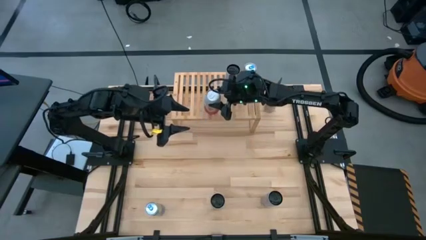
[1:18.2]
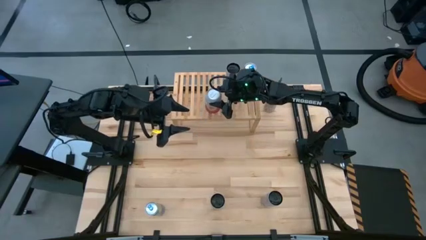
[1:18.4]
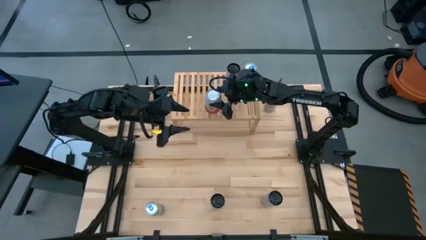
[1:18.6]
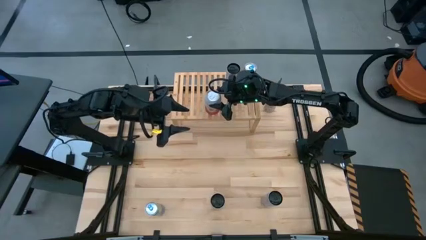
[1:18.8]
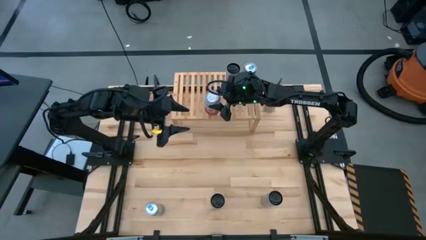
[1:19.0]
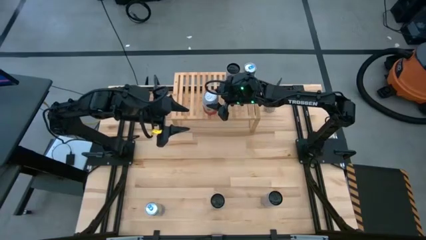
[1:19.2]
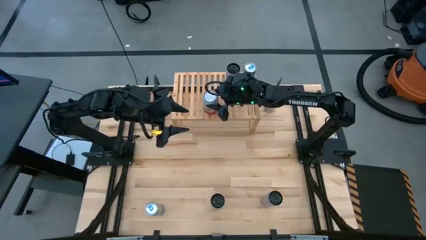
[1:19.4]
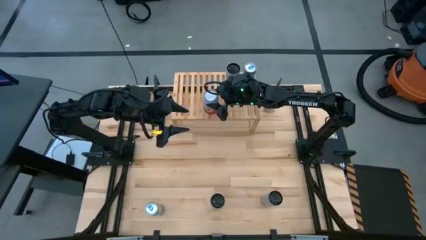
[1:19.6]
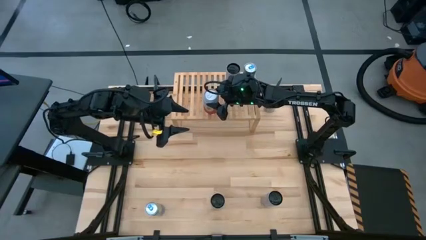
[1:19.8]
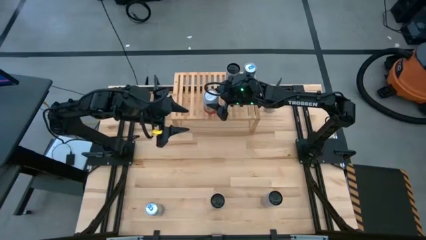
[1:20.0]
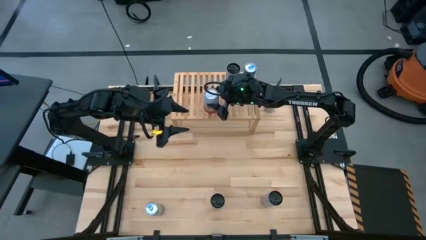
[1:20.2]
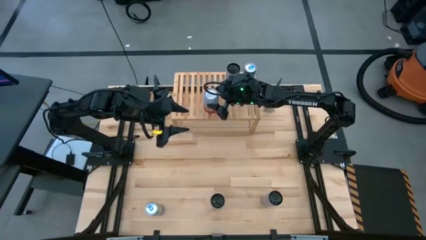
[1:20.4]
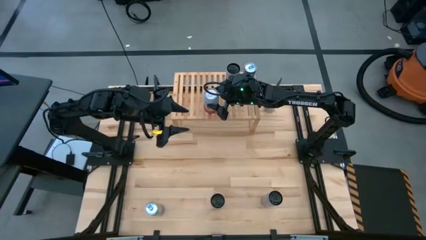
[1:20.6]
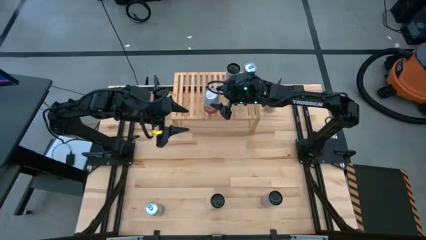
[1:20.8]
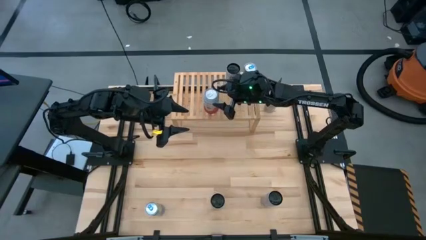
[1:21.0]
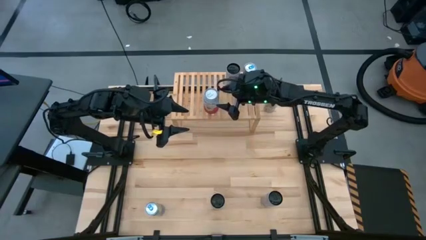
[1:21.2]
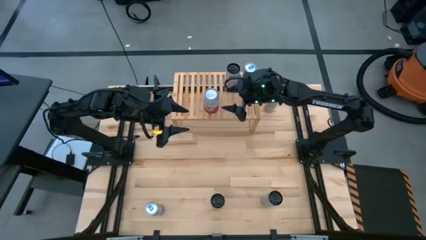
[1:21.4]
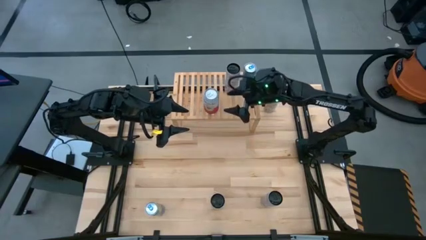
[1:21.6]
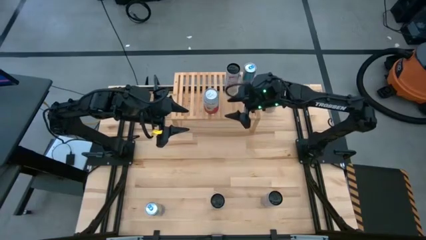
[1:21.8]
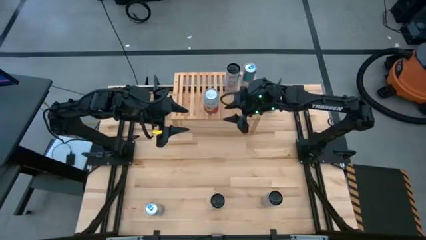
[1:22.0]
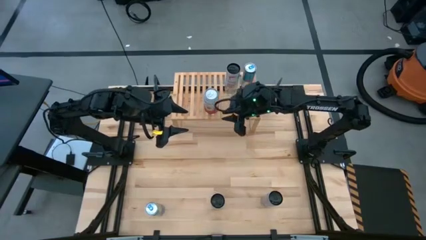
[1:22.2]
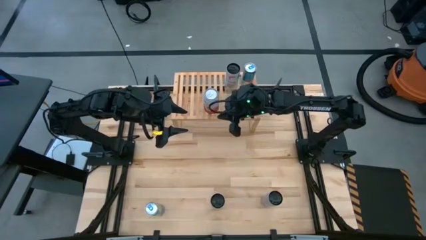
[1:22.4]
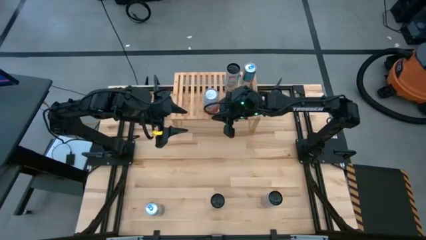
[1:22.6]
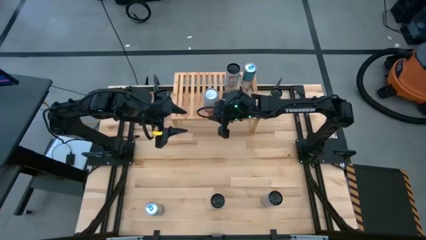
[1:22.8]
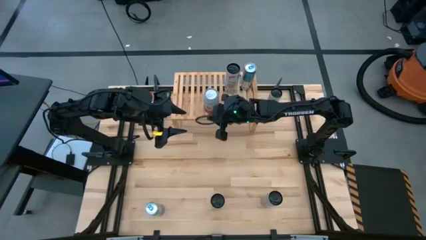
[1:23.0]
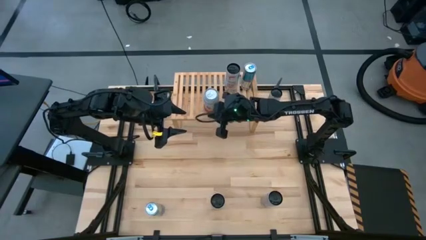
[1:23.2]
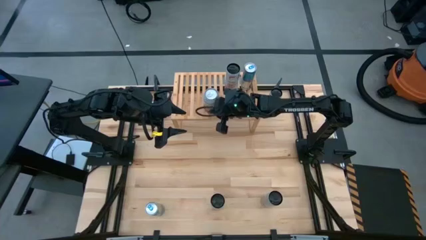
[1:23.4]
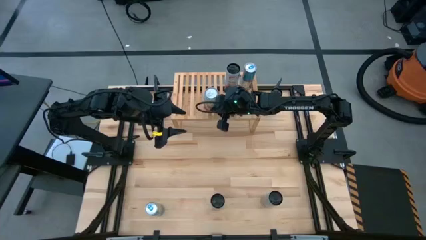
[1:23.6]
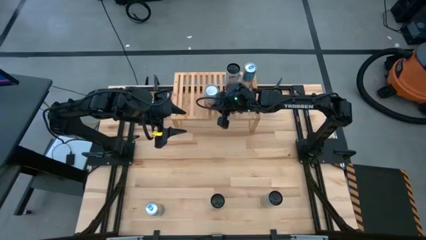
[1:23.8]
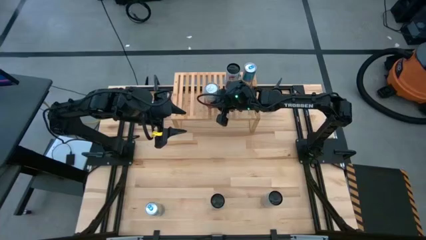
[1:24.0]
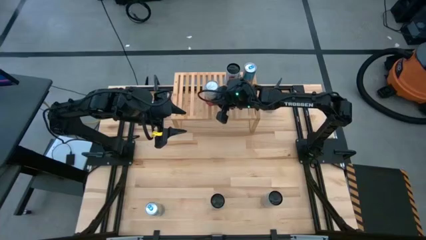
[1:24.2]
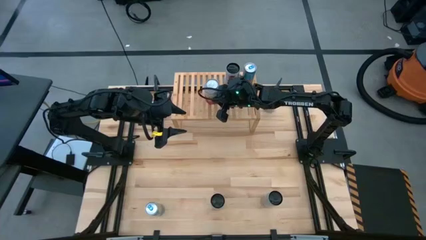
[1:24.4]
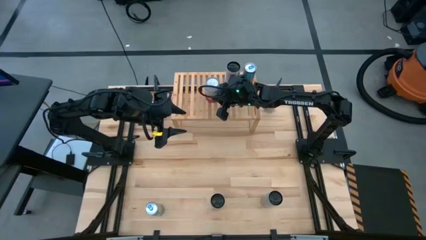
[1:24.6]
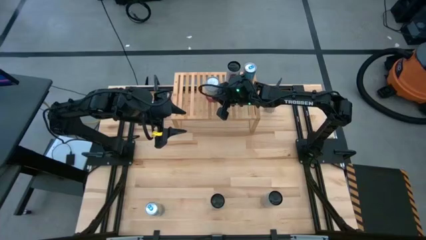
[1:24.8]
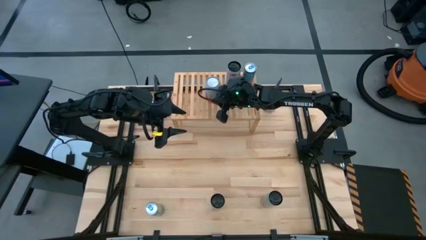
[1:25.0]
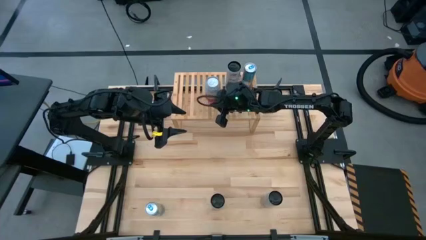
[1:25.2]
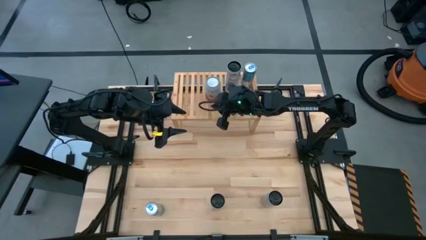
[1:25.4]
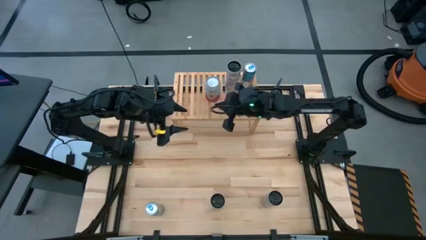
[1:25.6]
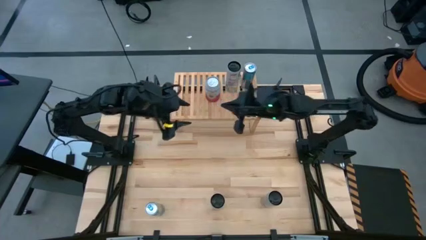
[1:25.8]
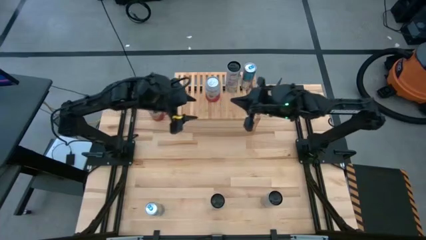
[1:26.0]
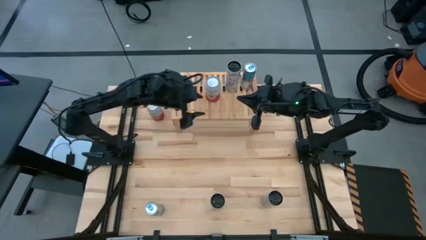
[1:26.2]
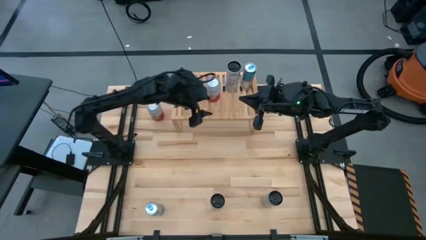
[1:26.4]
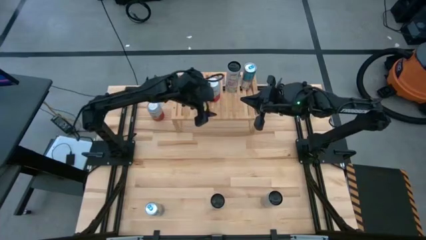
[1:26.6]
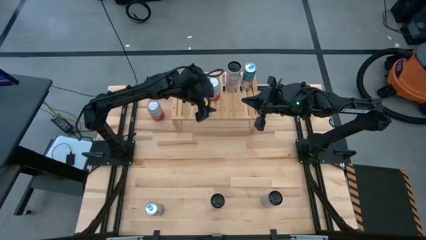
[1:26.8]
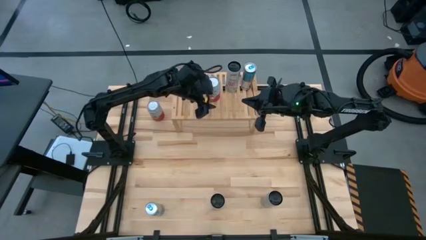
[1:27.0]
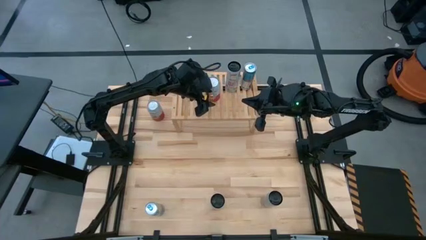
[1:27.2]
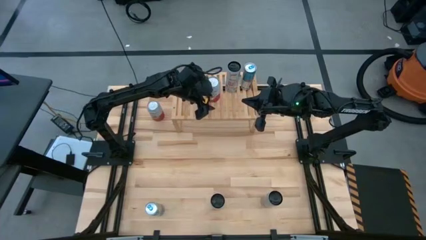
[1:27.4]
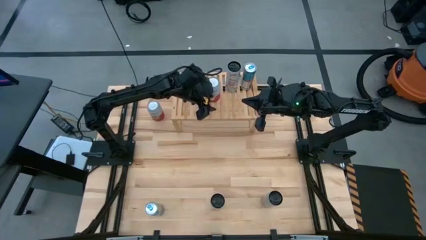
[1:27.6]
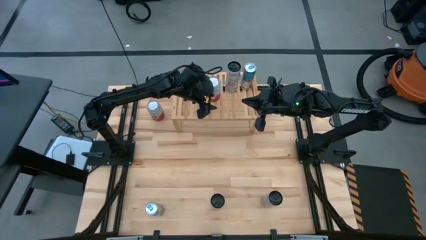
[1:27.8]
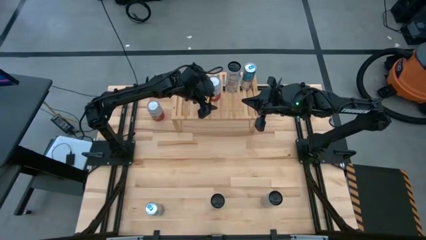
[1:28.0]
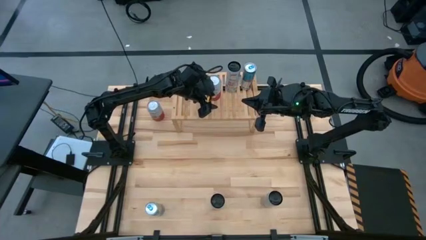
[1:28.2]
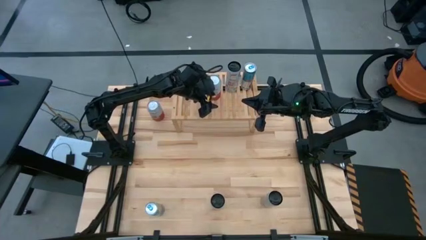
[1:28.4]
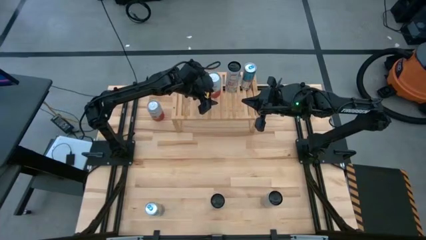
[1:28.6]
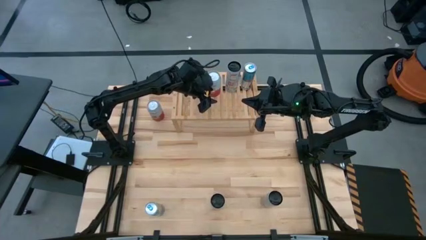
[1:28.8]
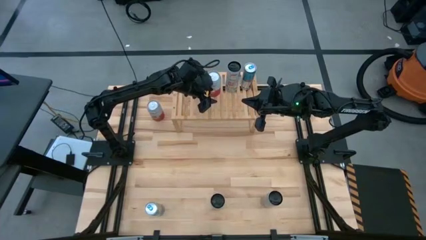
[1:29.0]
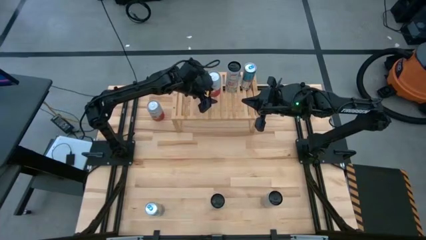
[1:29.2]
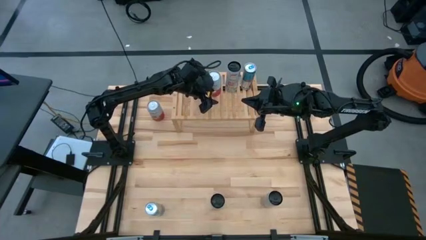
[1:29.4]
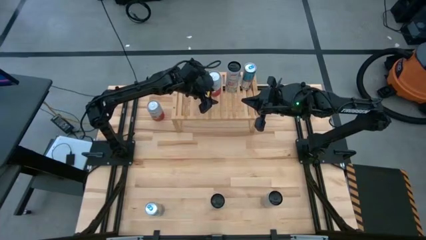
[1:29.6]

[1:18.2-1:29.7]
Task: Place canned beverage on shelf
Put the bottom pink white soda can on the shelf
